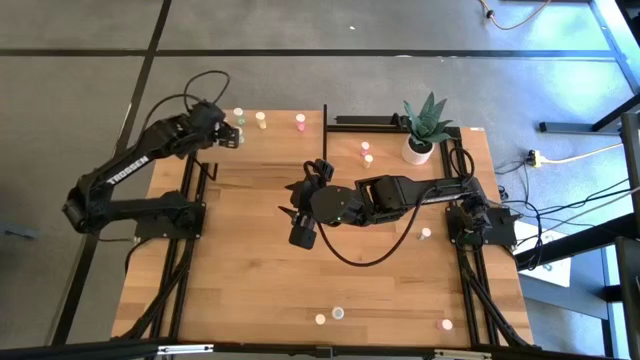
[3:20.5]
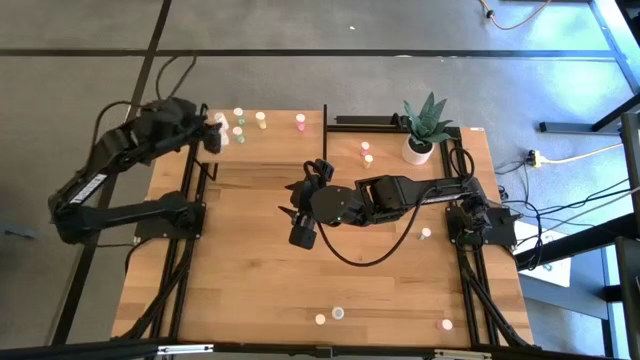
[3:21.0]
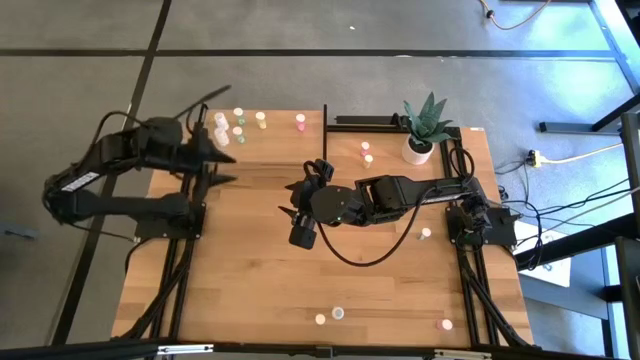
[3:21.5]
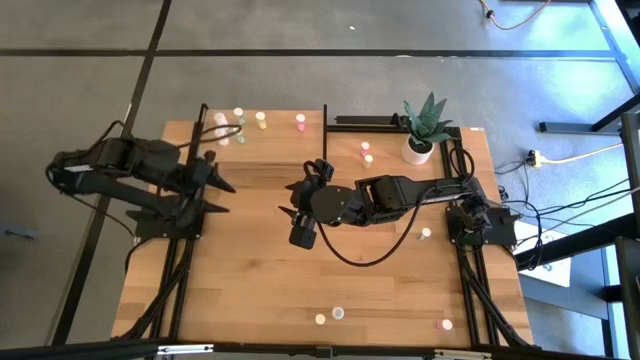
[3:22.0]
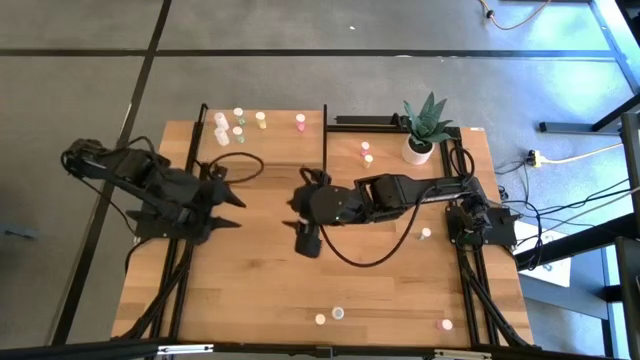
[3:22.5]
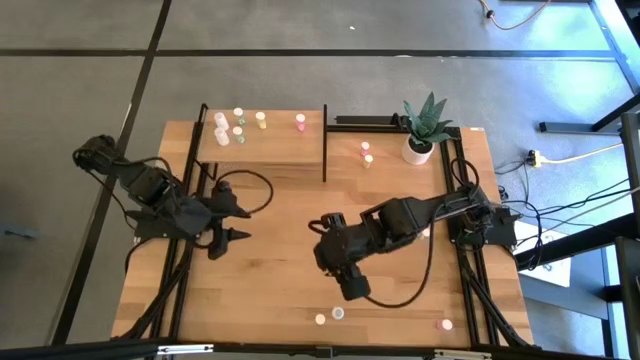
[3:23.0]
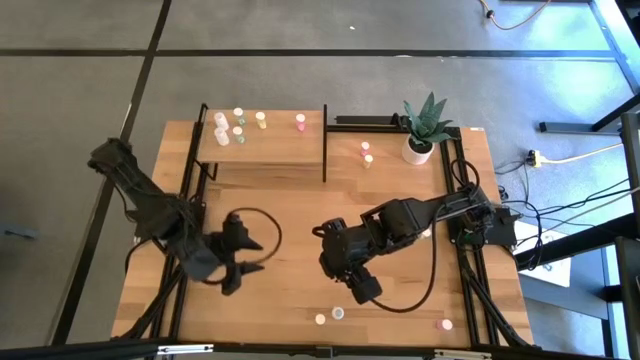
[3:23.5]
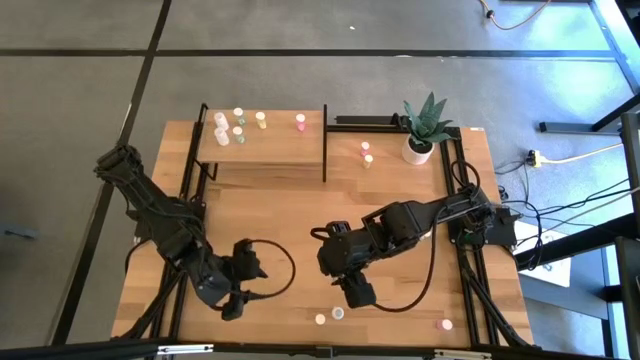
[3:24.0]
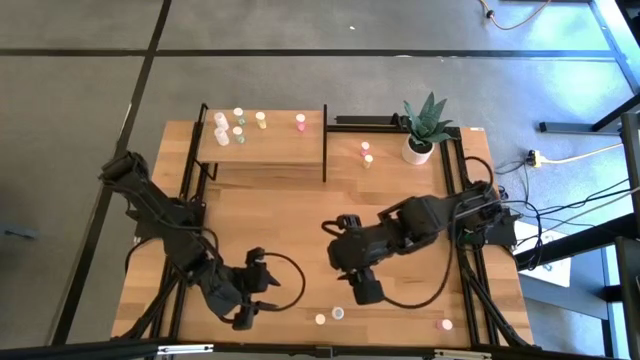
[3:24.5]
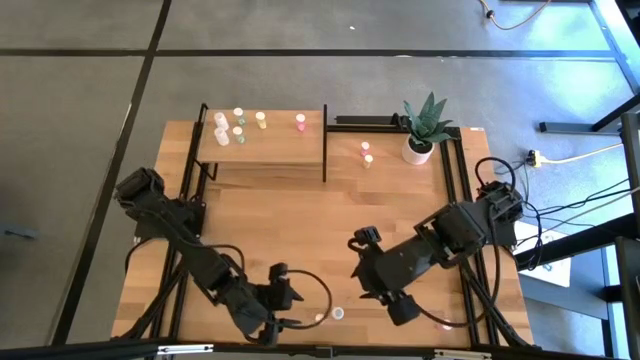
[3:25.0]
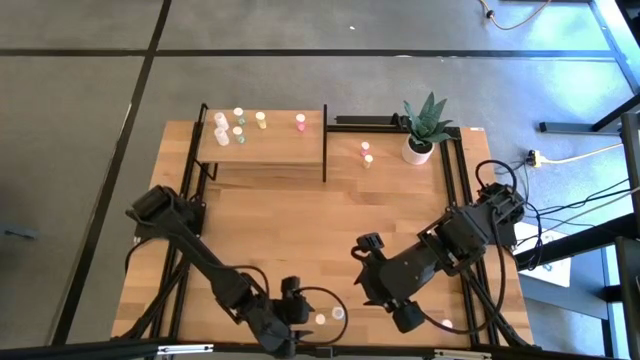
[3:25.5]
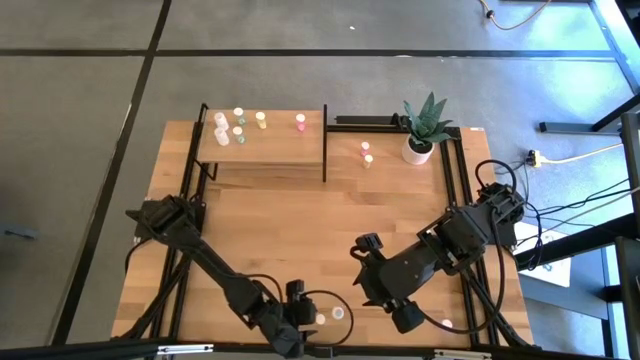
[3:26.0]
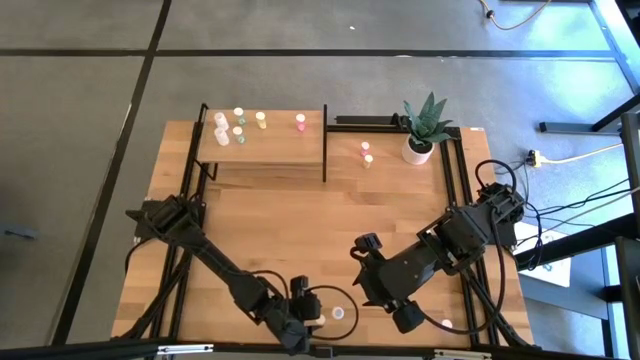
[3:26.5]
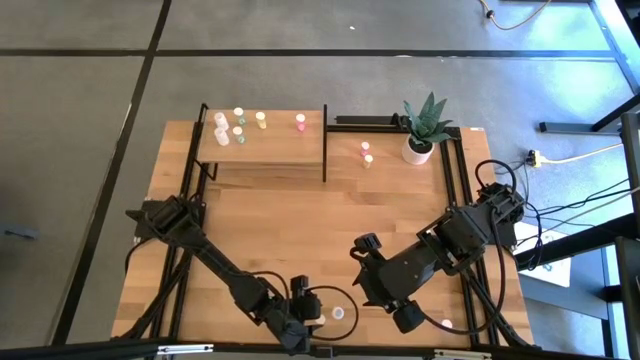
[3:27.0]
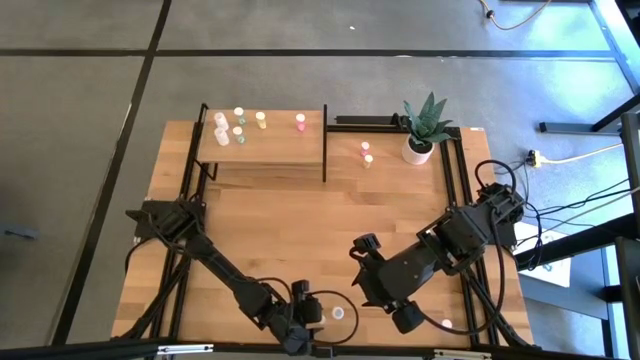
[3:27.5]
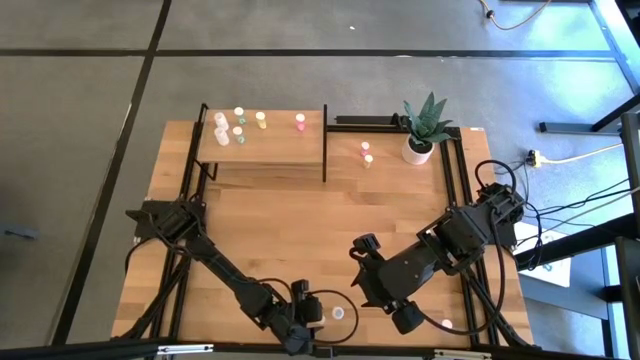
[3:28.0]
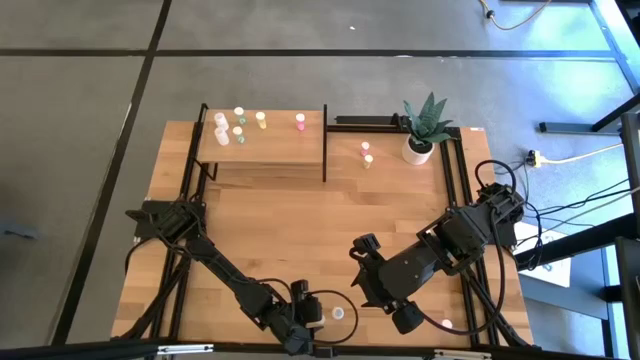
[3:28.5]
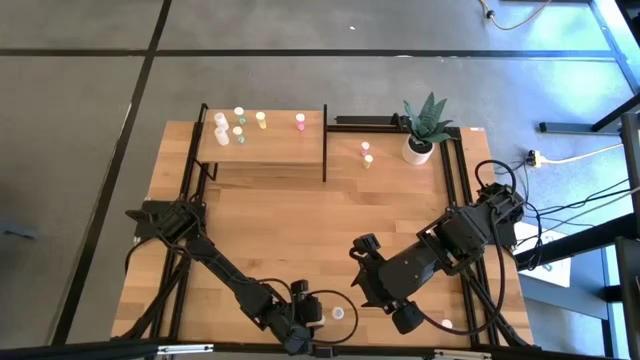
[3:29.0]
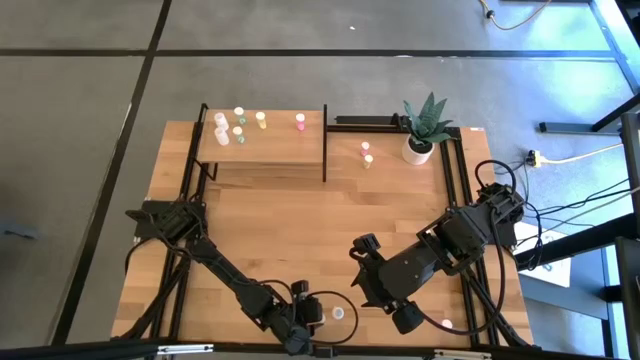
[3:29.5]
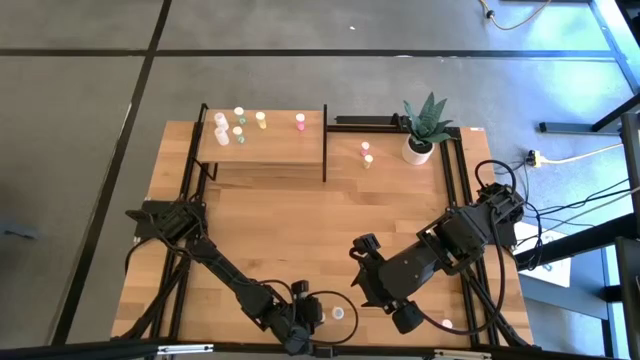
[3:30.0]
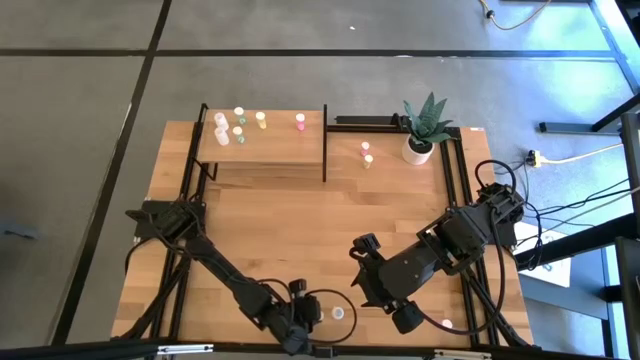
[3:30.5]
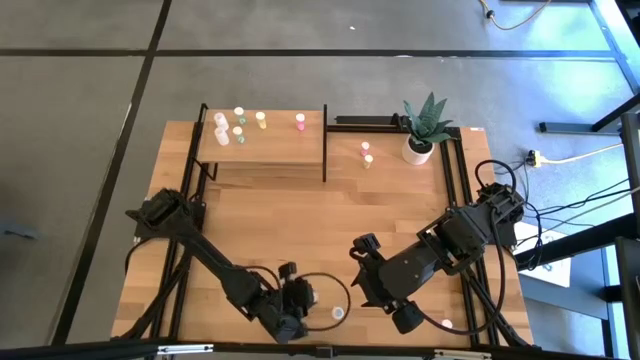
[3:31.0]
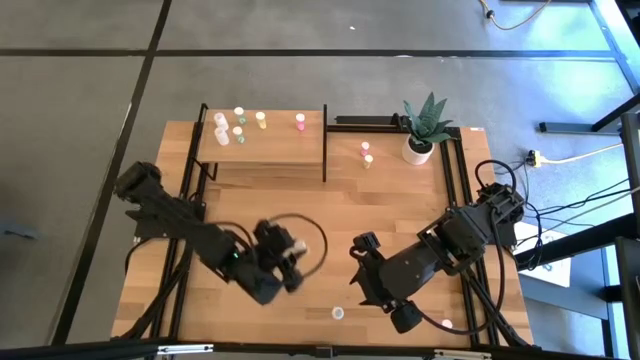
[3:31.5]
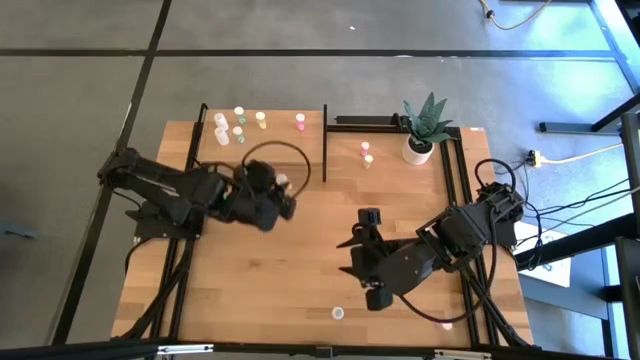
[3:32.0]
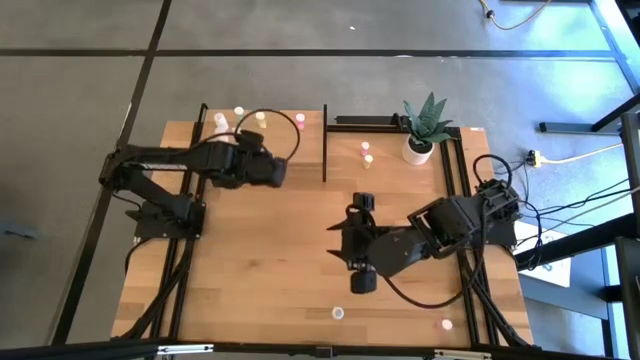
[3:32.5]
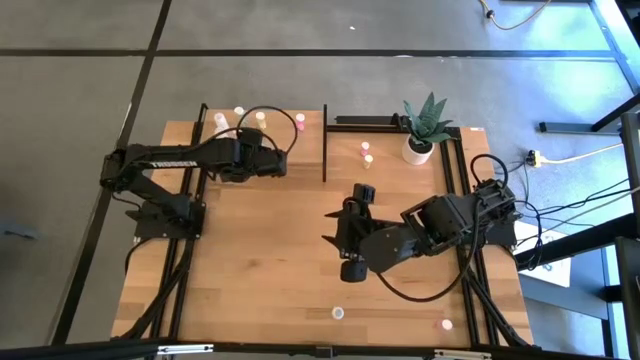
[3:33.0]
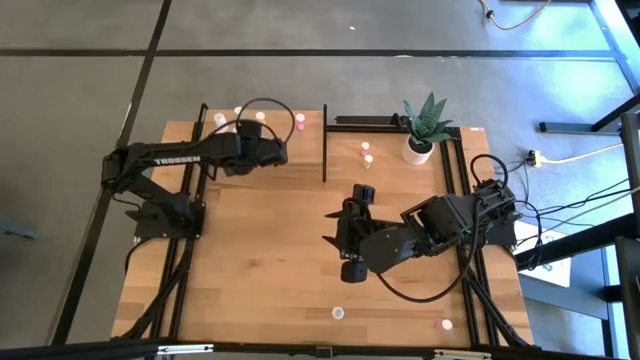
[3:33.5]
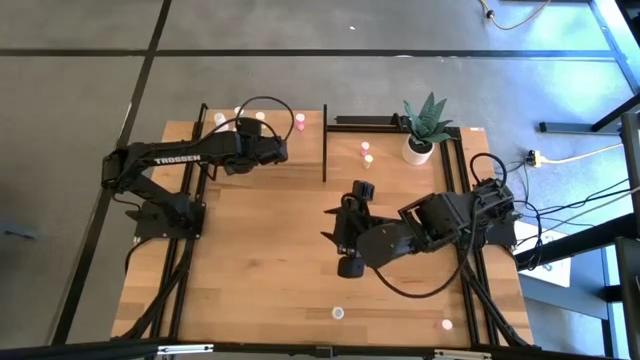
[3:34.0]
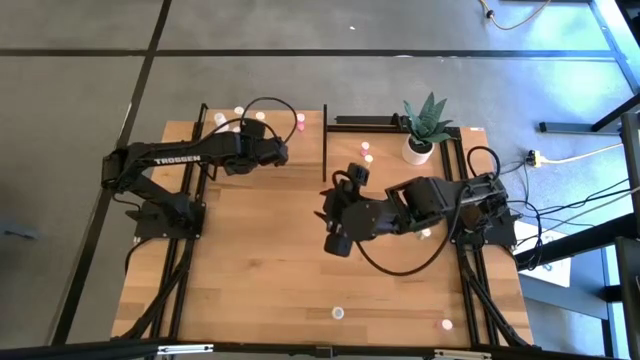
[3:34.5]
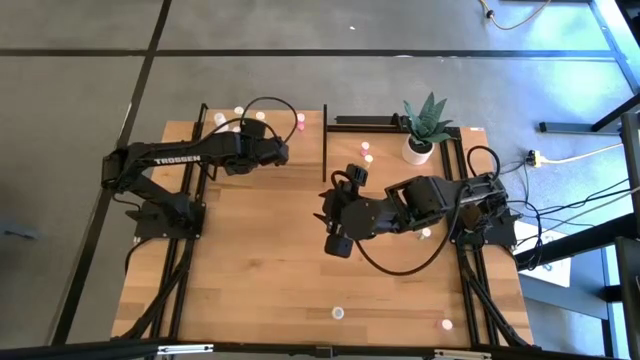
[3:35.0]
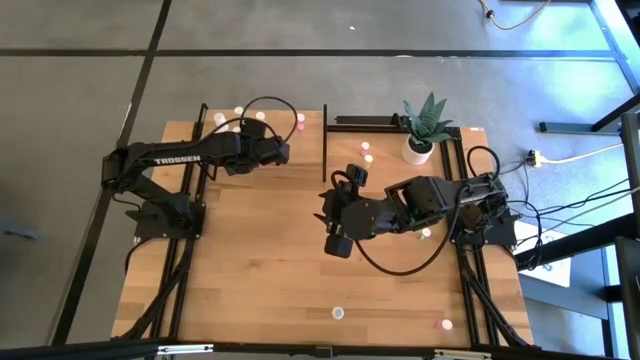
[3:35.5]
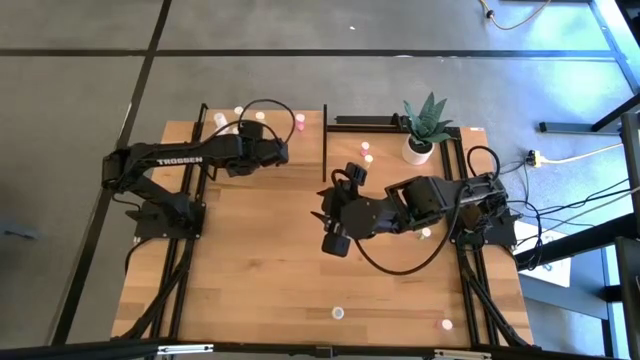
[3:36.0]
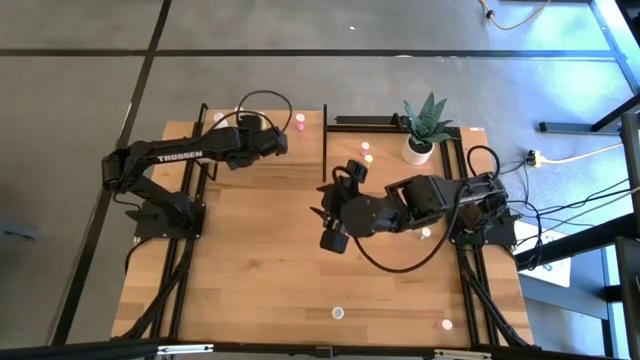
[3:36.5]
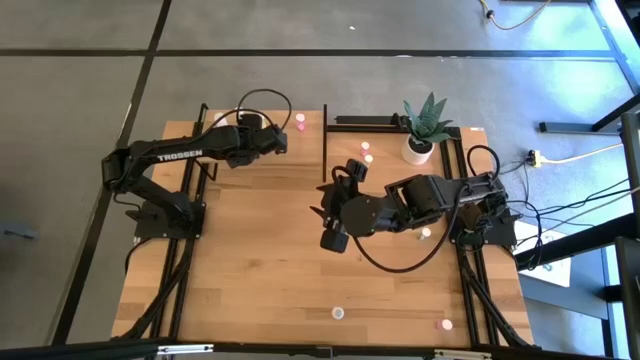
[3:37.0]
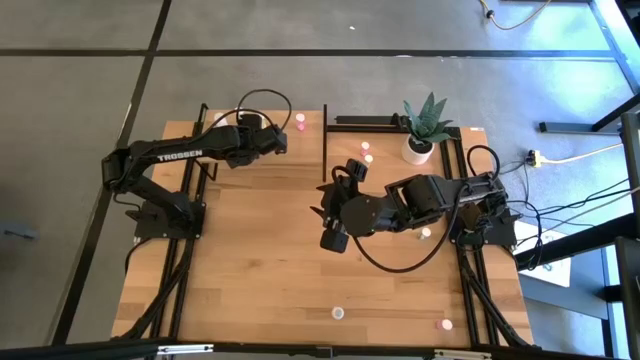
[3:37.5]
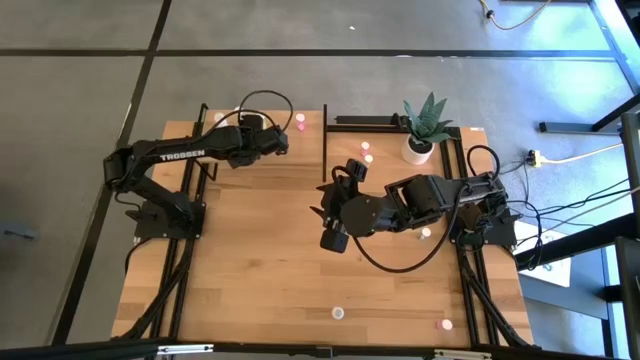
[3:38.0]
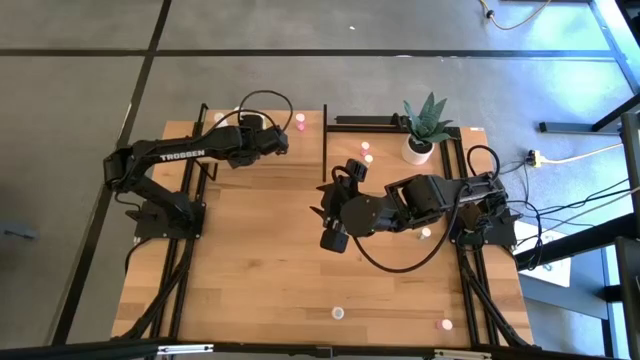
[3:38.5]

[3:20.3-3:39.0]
Task: Pick and place medicine bottles onto shelf by color
Put the bottom yellow pill bottle aligned with the other yellow pill bottle on the shelf
